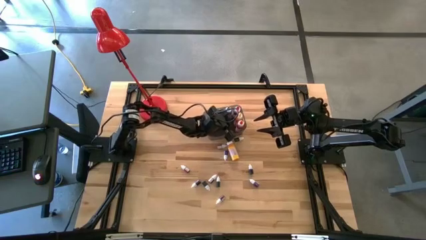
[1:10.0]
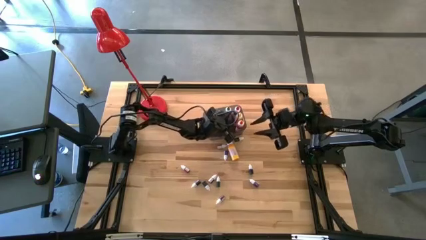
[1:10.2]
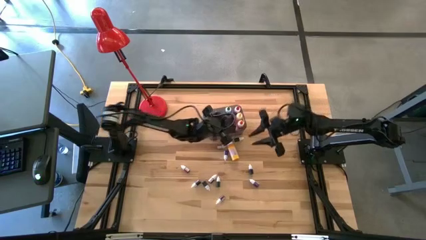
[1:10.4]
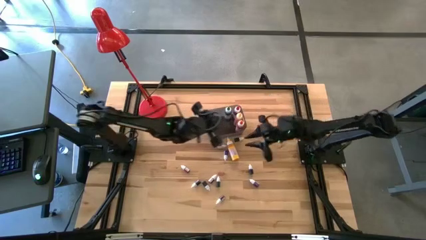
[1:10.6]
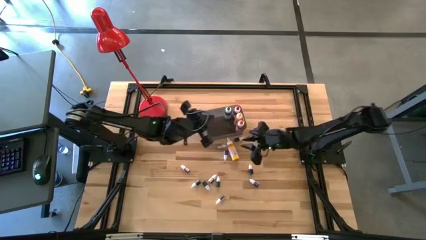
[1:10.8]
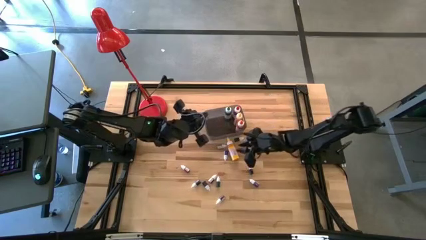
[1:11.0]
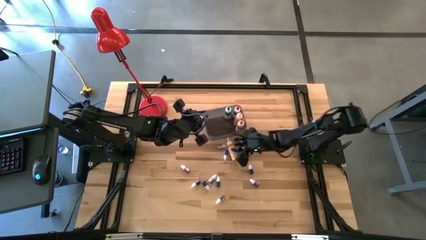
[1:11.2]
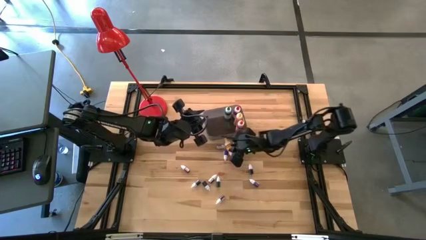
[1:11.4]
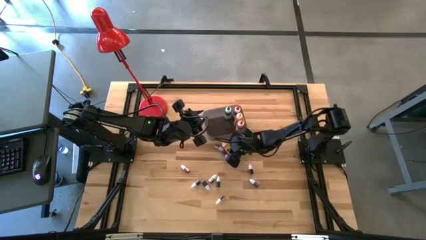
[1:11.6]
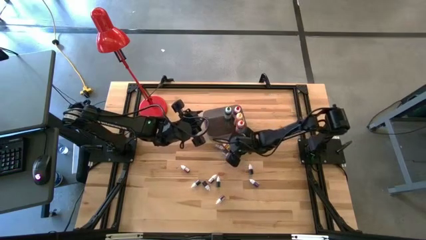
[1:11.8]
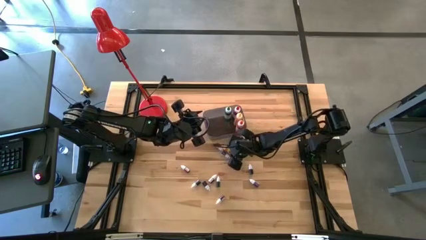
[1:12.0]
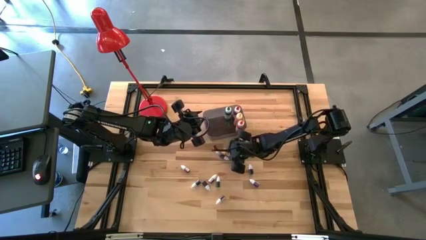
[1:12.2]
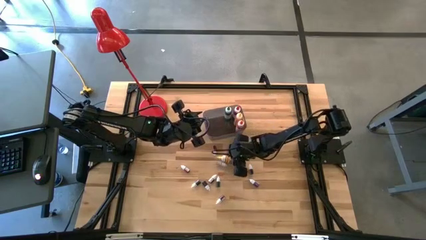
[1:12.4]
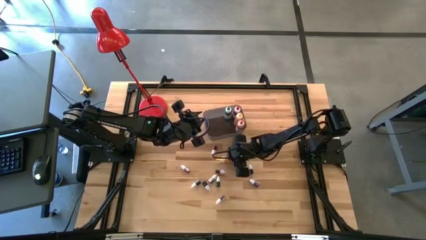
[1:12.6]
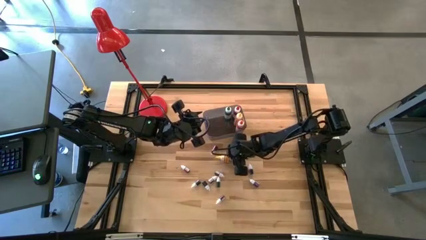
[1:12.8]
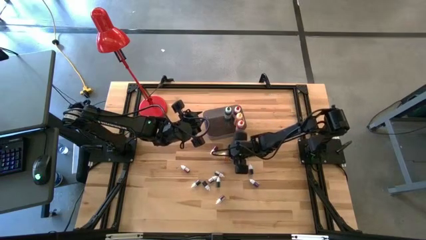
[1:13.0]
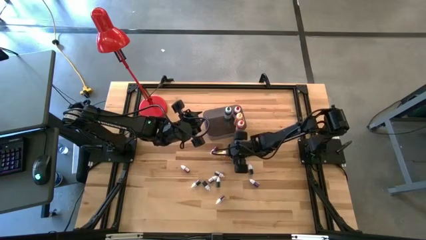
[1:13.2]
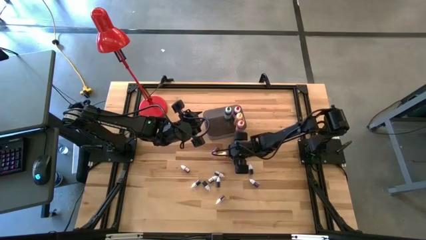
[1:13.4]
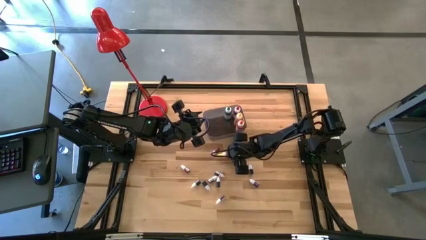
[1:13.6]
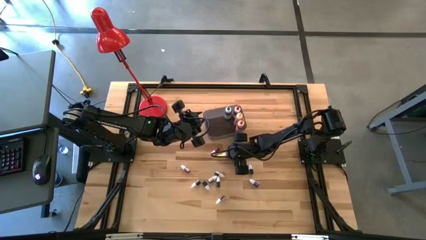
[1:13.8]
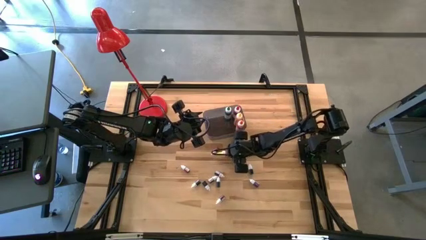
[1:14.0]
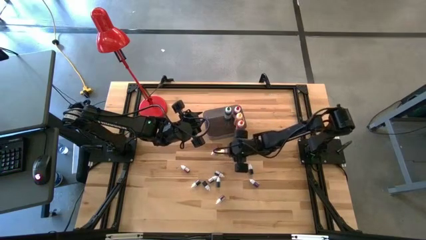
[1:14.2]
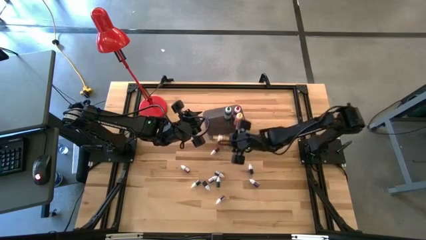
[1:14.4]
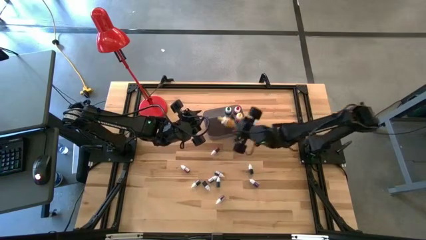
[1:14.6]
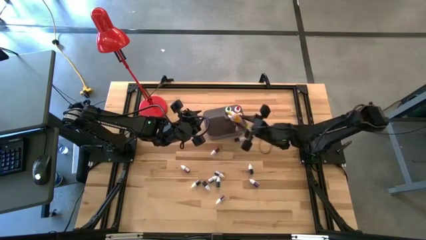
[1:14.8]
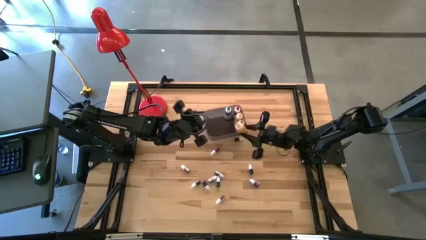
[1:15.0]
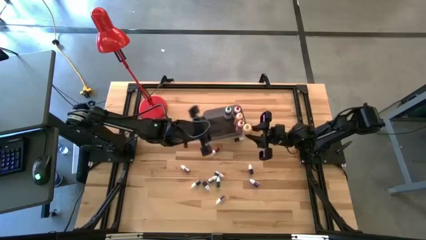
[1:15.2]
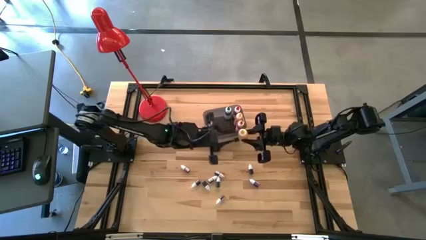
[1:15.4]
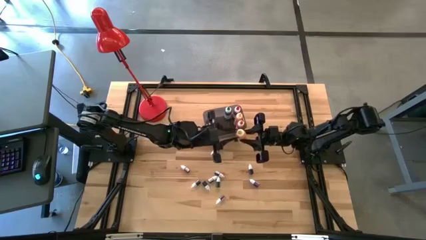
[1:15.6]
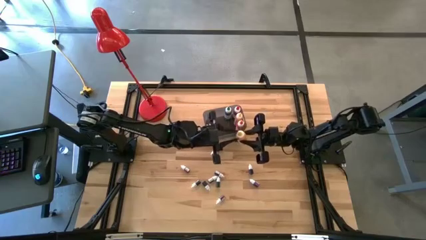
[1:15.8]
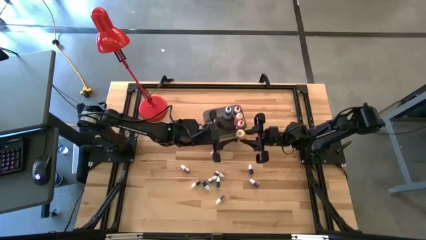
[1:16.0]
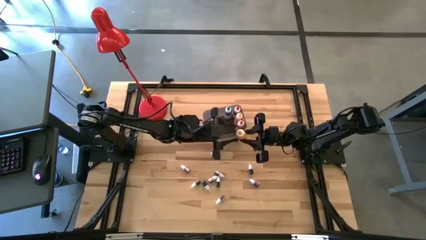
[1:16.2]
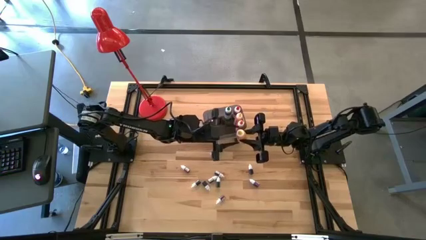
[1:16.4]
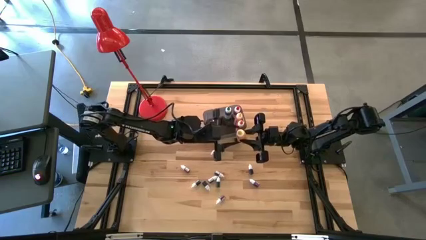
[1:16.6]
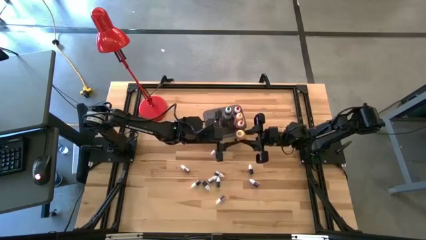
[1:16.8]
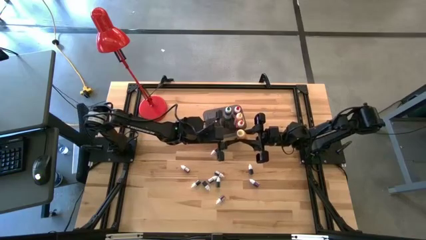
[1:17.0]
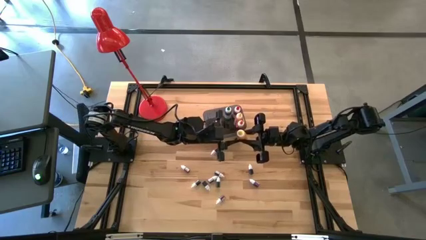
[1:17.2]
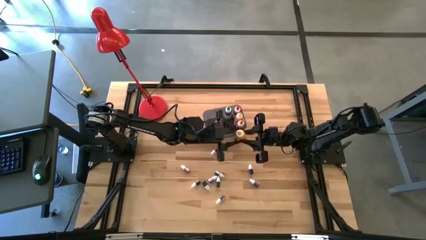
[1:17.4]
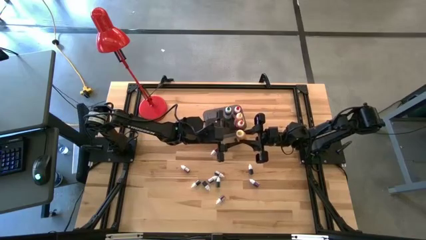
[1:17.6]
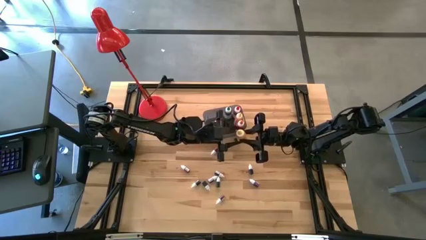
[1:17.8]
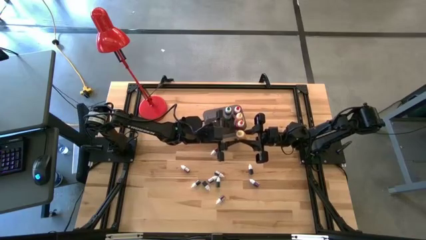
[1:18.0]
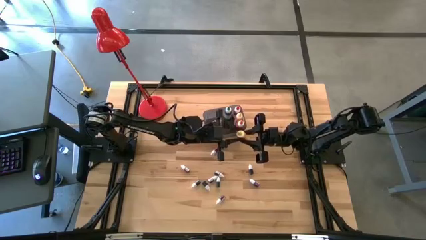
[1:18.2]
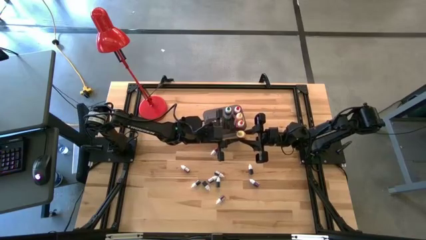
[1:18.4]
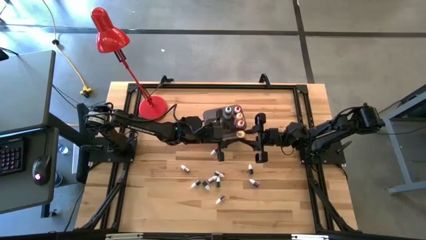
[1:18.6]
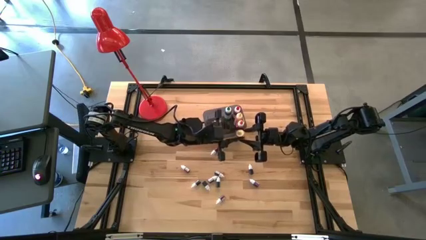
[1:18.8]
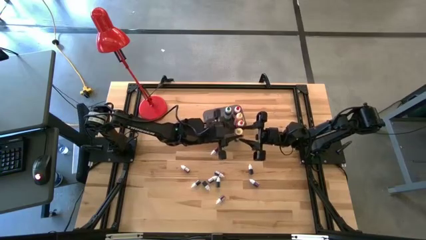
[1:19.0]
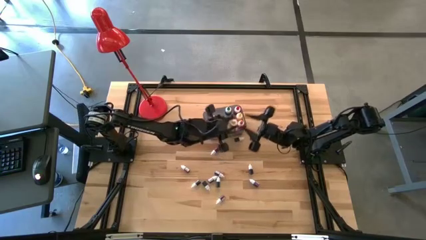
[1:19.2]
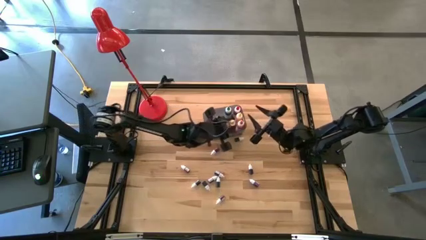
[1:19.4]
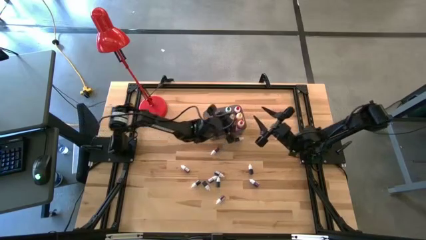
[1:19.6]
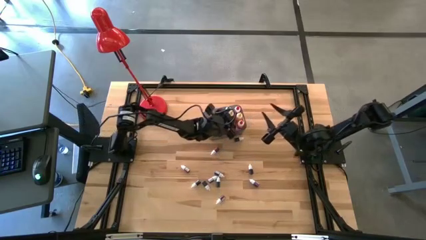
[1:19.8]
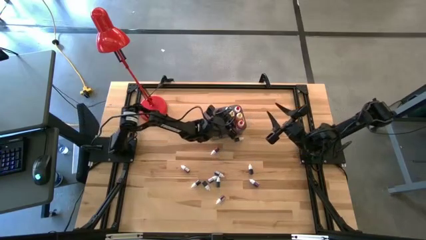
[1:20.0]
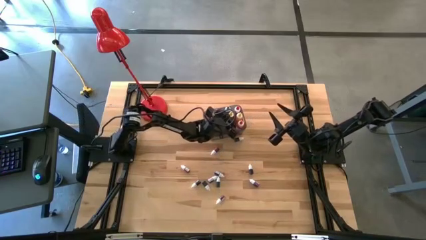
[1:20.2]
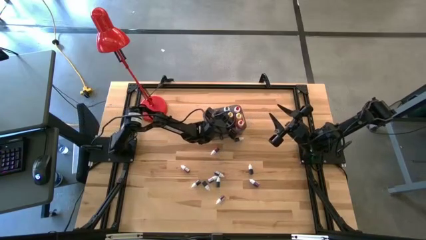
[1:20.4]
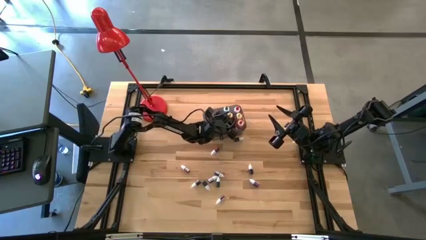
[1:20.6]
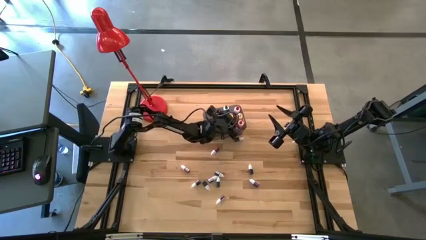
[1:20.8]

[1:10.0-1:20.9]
Task: Pick & Place food coloring
Put the large yellow food coloring bottle into the black bin

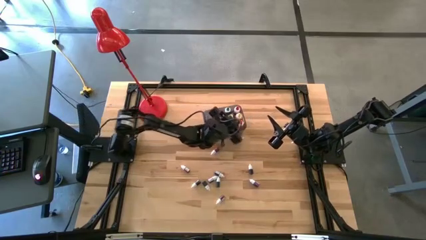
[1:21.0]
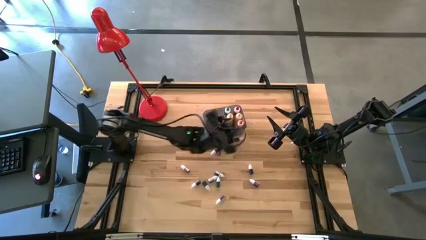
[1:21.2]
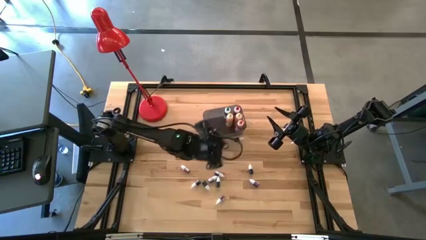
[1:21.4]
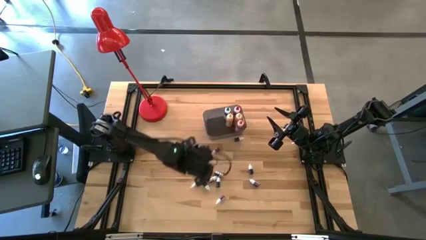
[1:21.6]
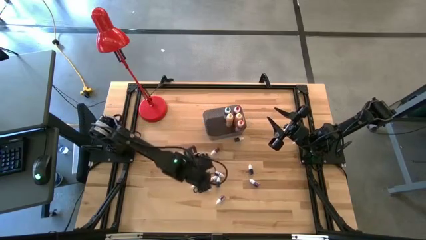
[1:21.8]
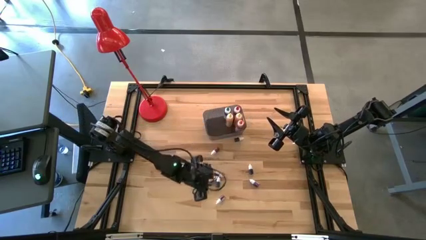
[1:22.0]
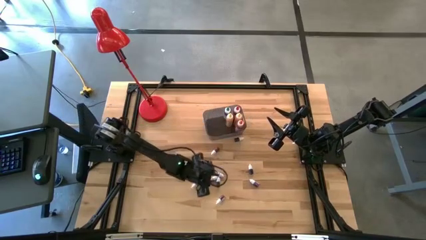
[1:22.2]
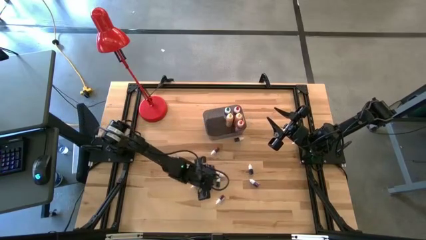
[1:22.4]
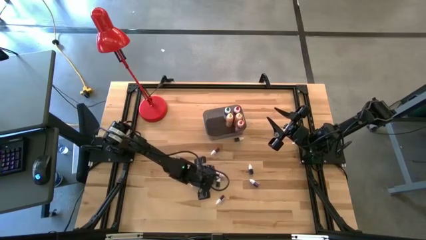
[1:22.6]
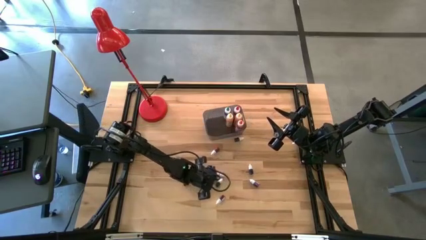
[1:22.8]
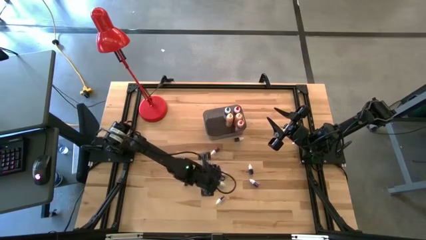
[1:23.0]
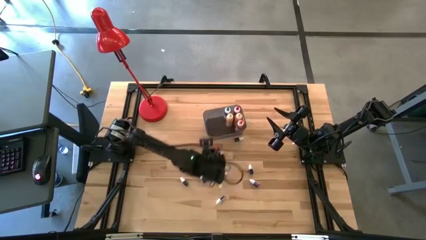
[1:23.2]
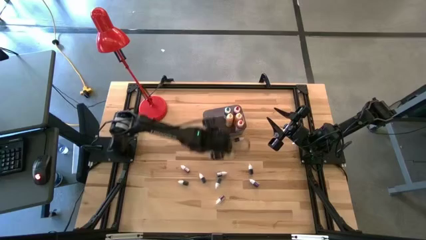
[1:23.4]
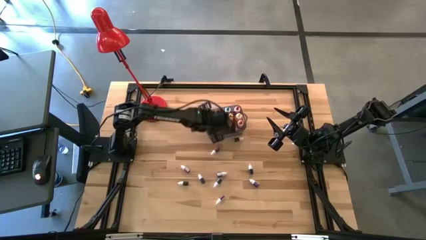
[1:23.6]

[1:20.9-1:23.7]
Put the small black food coloring bottle into the black bin

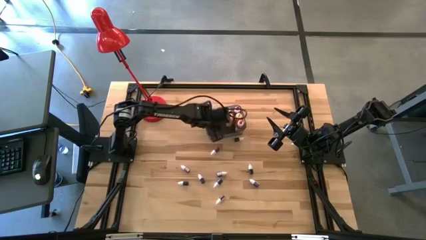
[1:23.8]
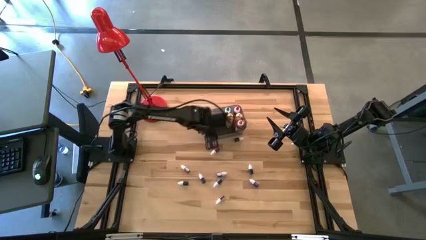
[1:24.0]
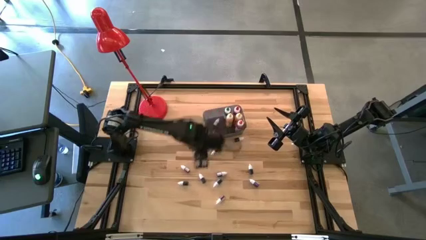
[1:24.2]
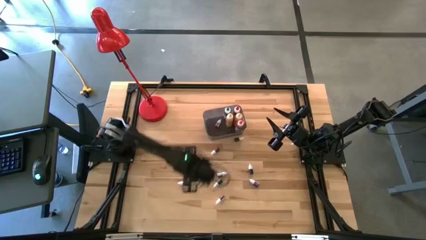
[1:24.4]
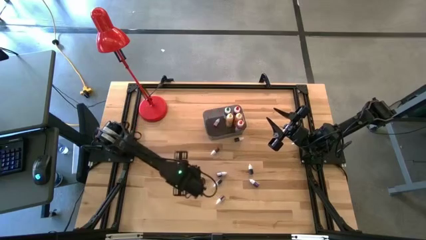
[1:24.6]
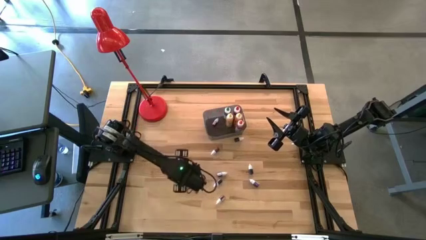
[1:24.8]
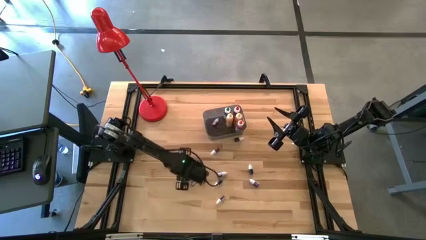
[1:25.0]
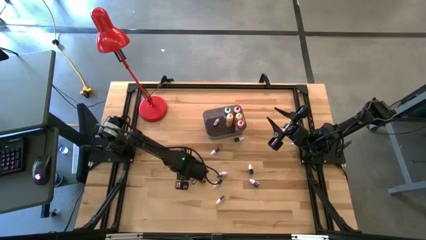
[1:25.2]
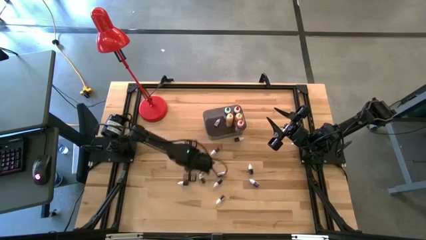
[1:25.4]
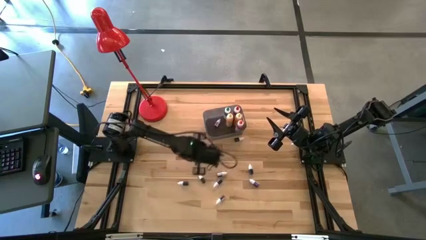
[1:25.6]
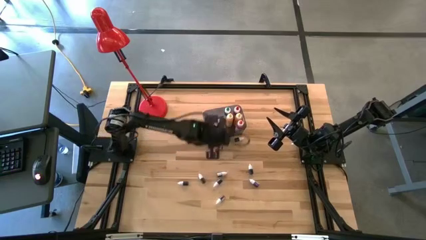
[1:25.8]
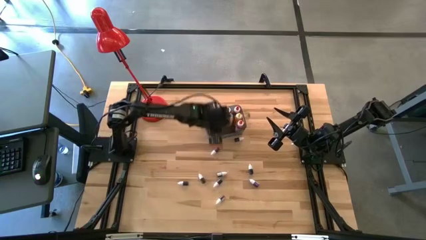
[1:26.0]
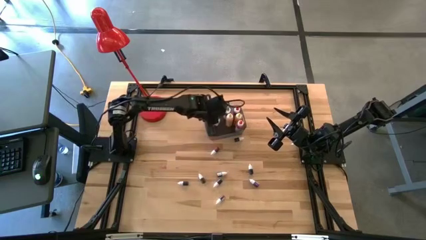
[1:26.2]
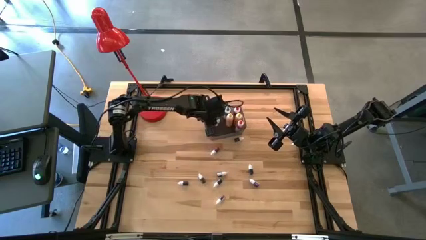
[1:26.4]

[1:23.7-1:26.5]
Put the small red food coloring bottle into the black bin
